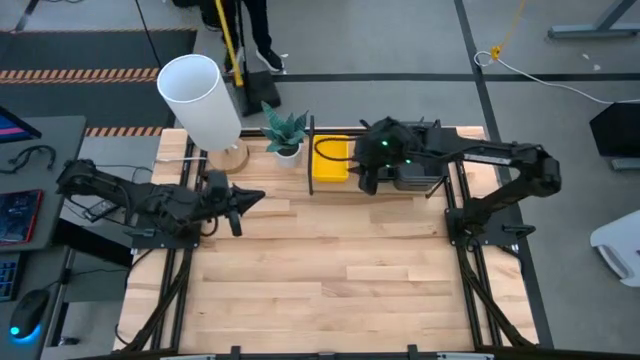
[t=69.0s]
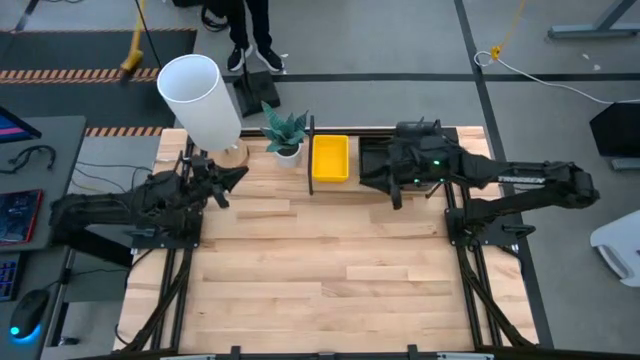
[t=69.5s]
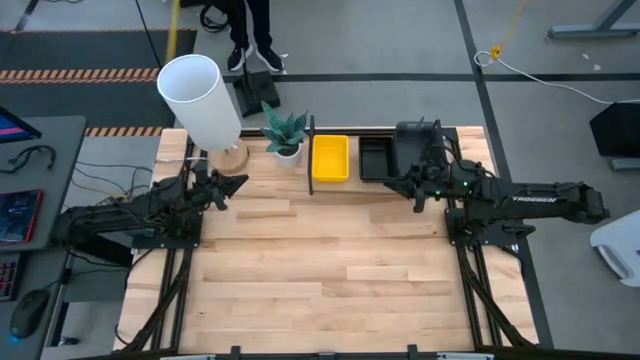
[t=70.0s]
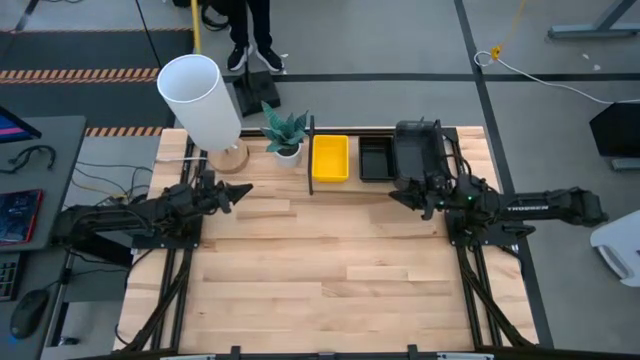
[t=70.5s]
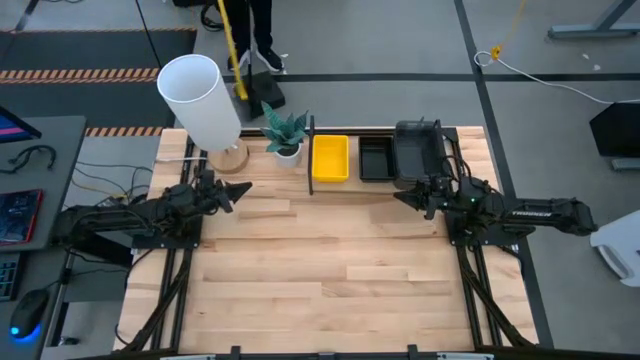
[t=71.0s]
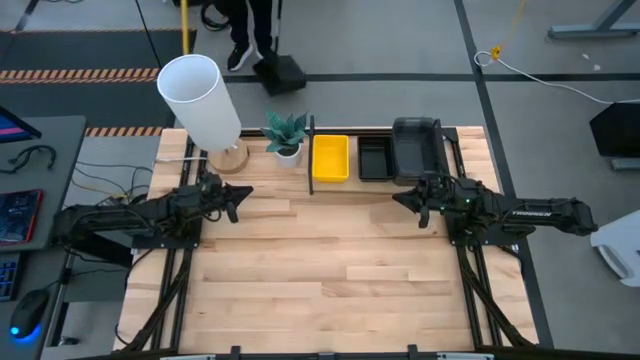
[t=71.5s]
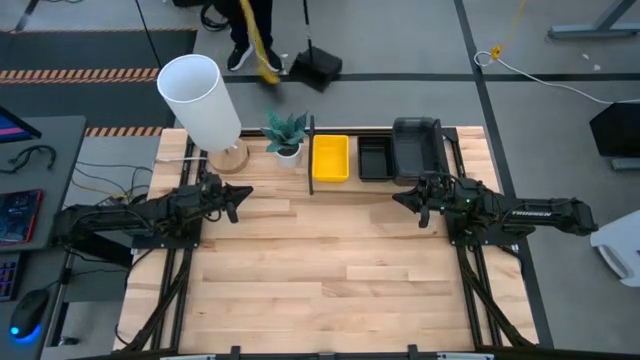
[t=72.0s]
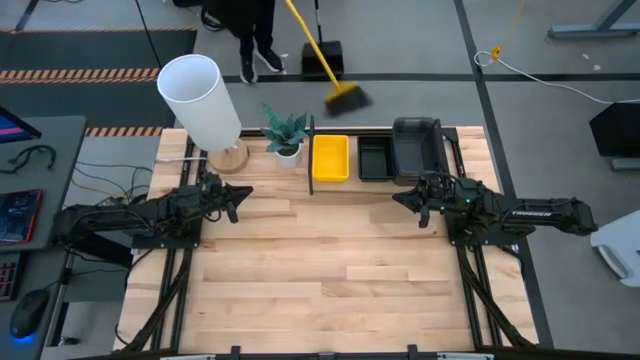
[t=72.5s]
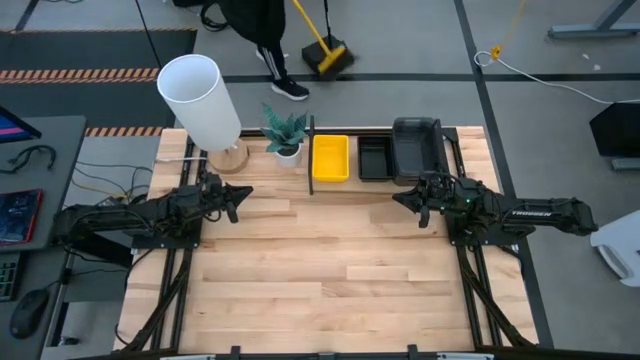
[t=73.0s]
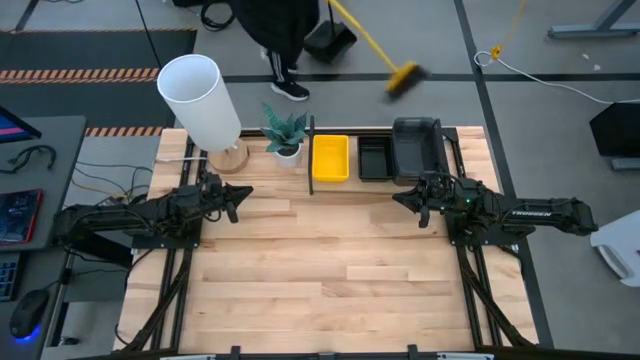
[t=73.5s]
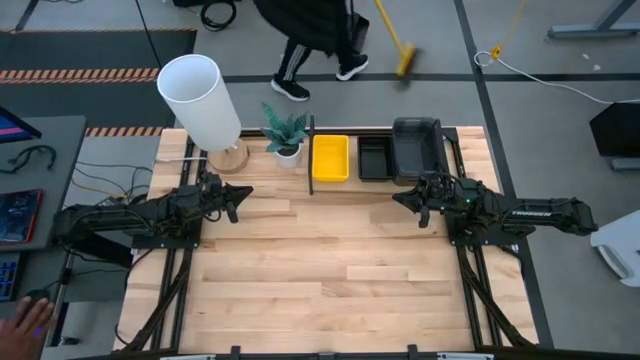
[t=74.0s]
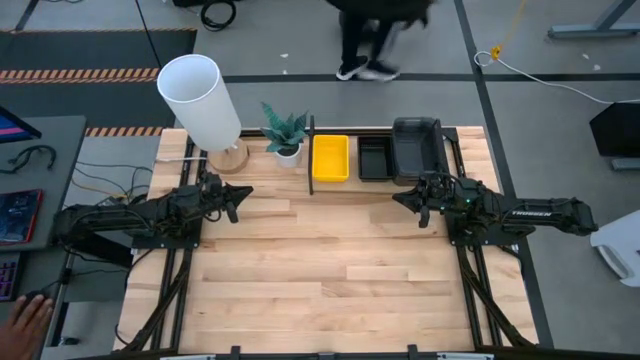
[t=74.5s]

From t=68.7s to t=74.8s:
Task: Stack baskets on shelf by color
Return to Home Position

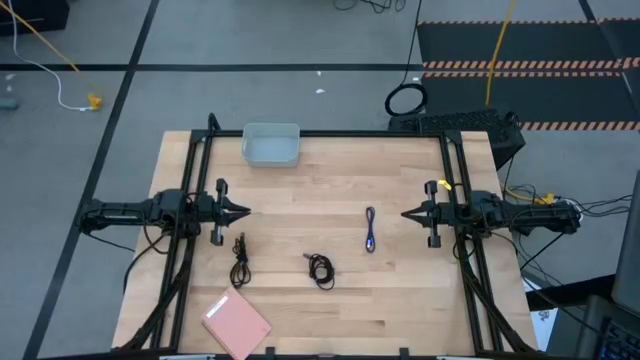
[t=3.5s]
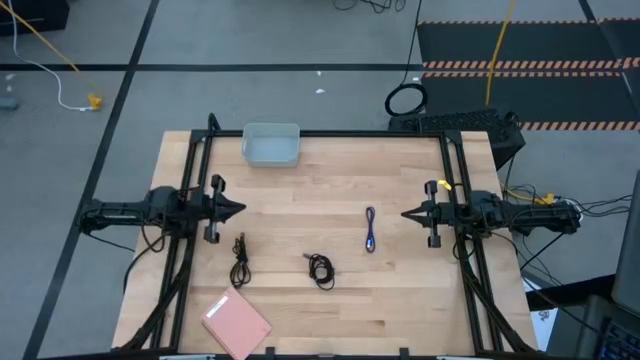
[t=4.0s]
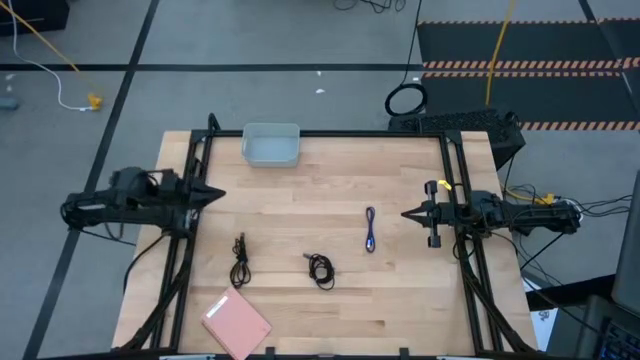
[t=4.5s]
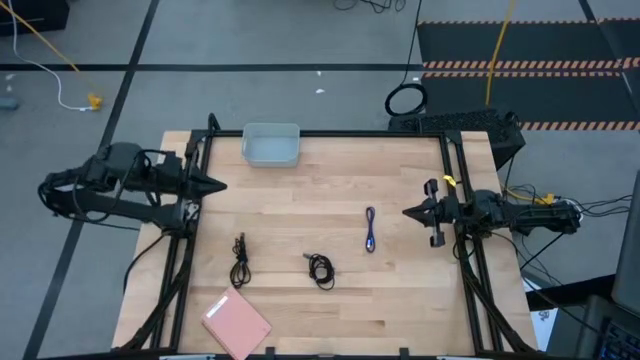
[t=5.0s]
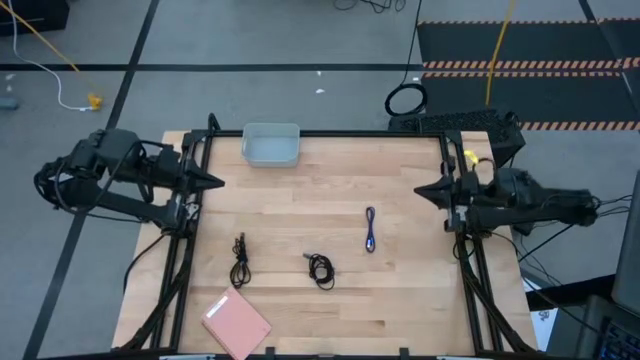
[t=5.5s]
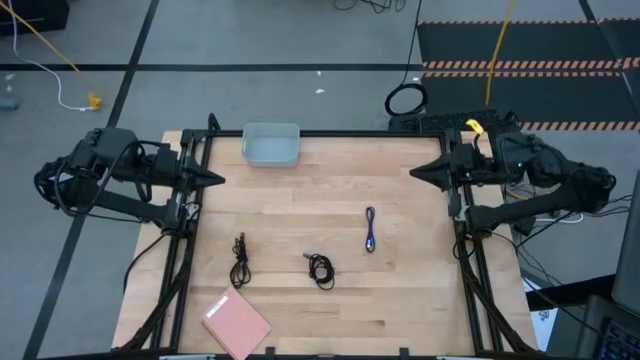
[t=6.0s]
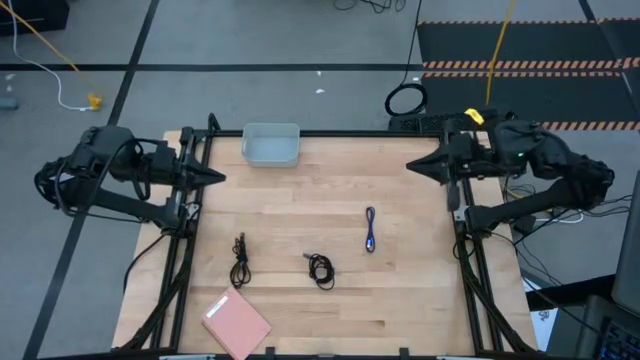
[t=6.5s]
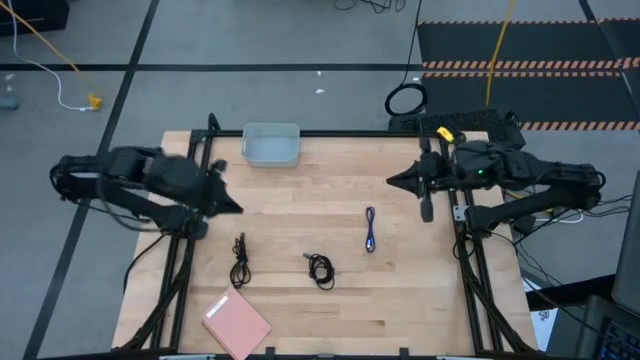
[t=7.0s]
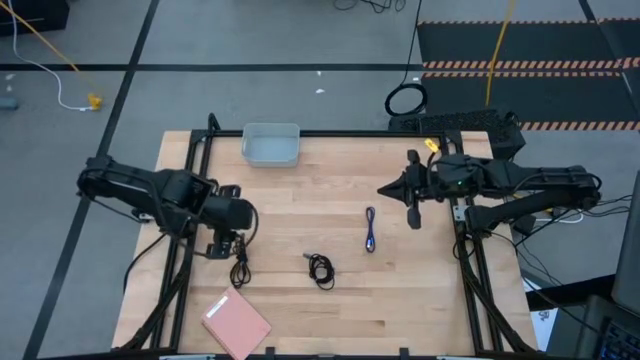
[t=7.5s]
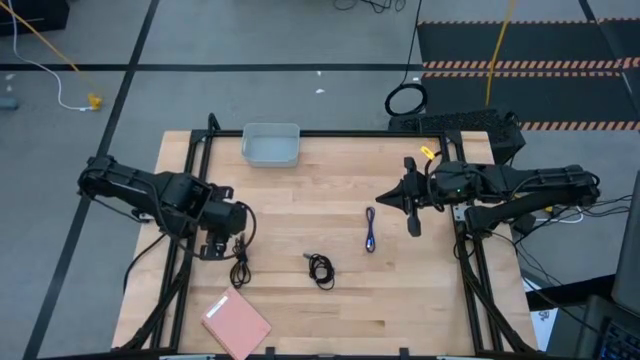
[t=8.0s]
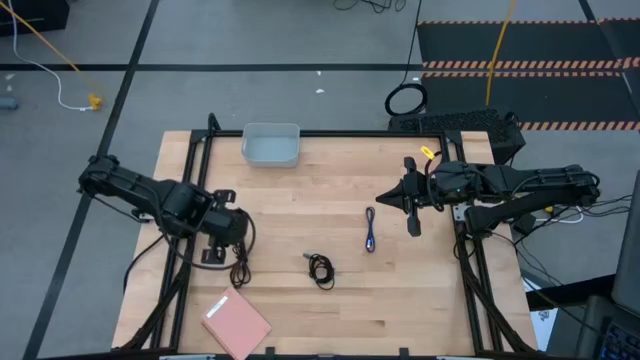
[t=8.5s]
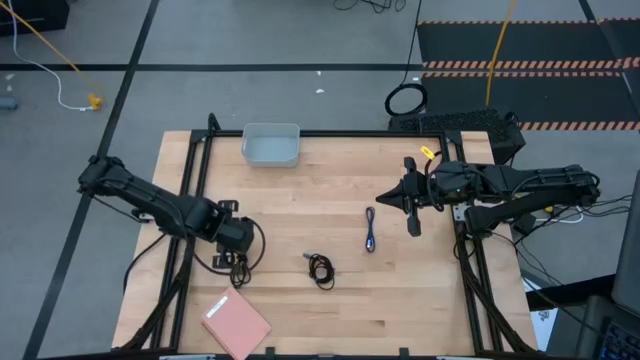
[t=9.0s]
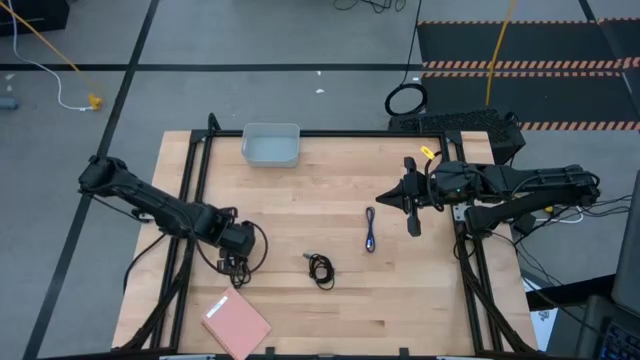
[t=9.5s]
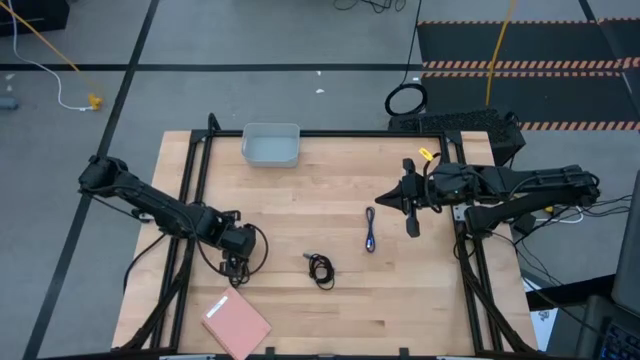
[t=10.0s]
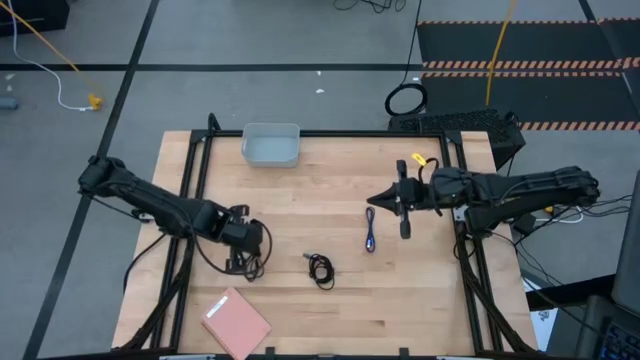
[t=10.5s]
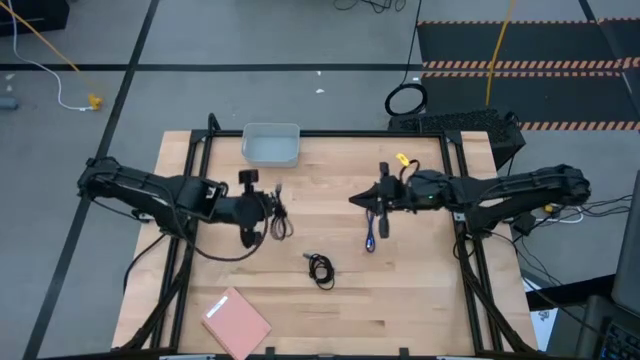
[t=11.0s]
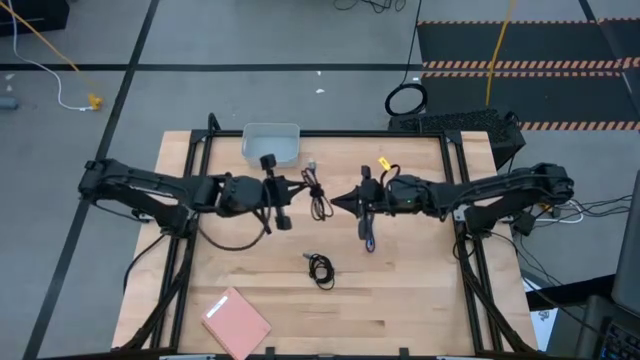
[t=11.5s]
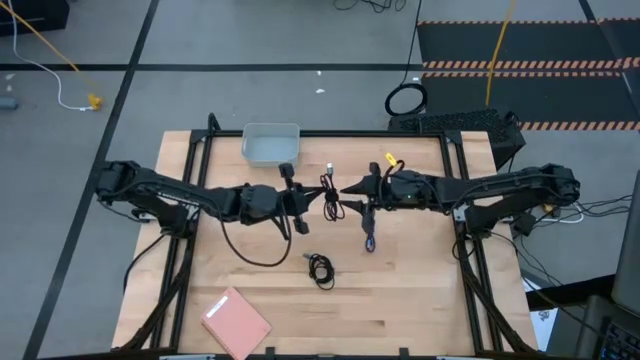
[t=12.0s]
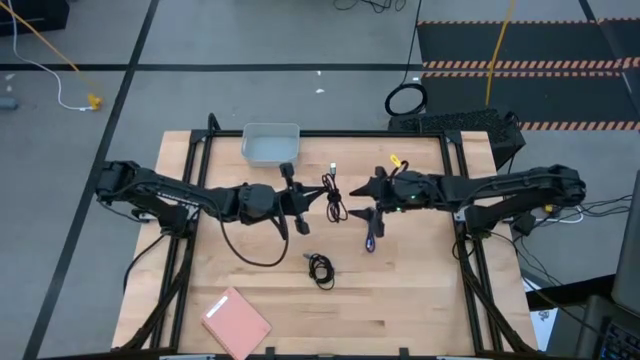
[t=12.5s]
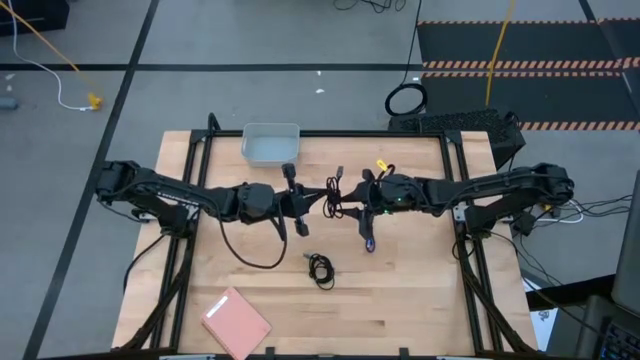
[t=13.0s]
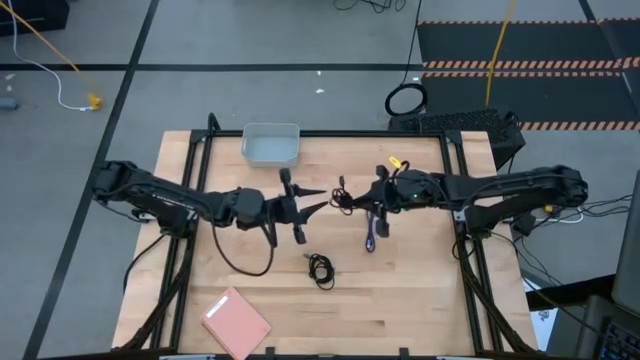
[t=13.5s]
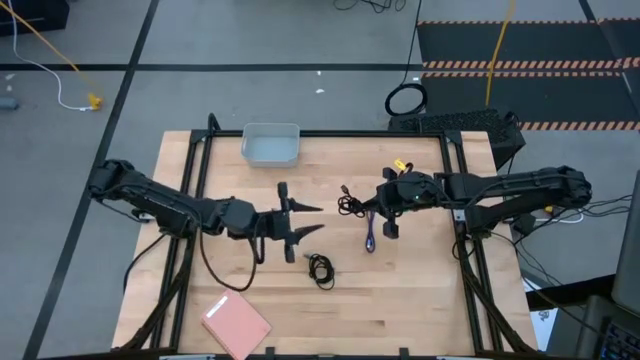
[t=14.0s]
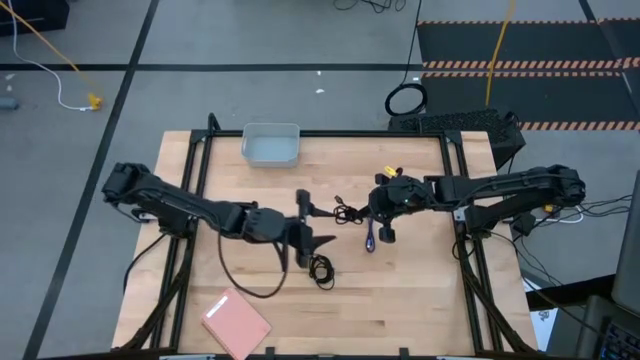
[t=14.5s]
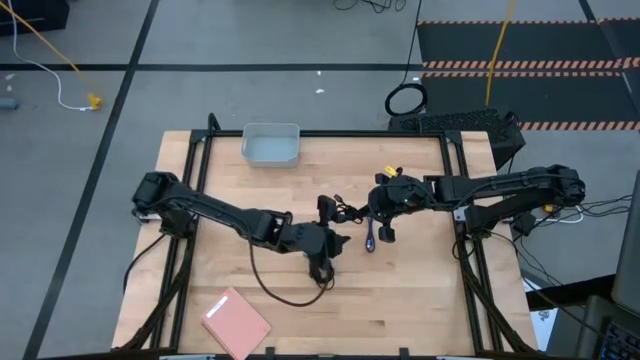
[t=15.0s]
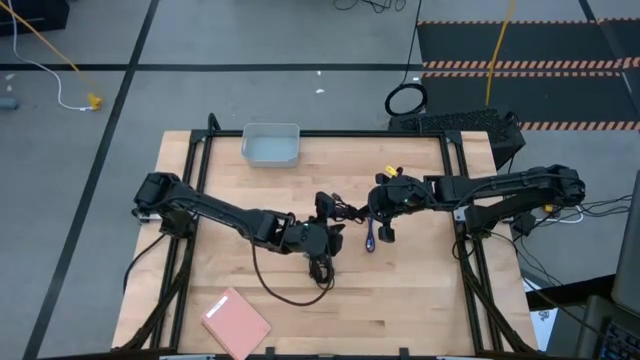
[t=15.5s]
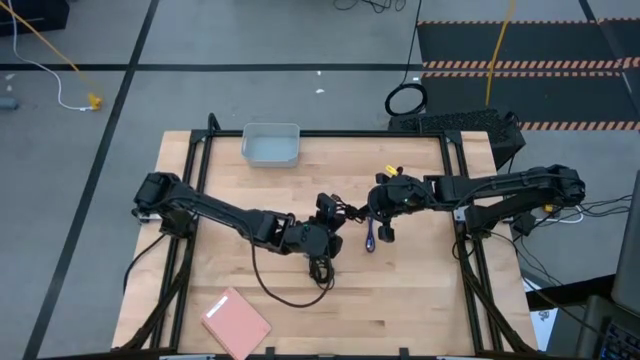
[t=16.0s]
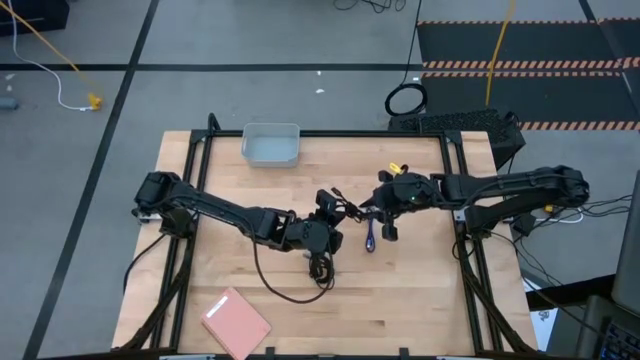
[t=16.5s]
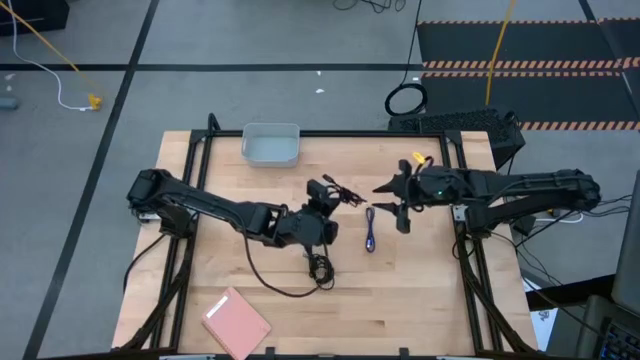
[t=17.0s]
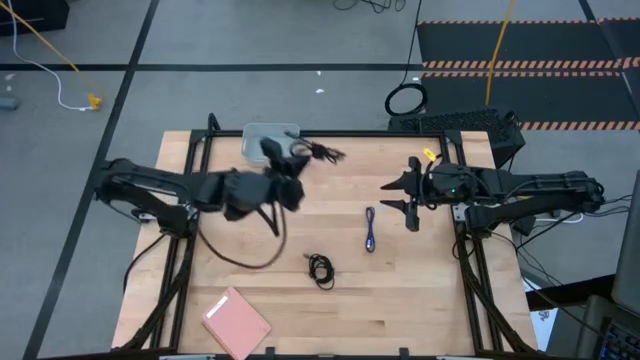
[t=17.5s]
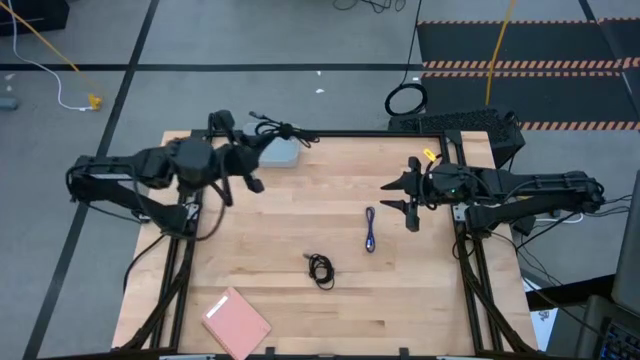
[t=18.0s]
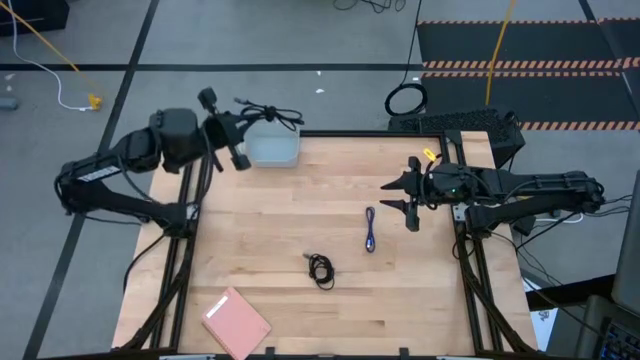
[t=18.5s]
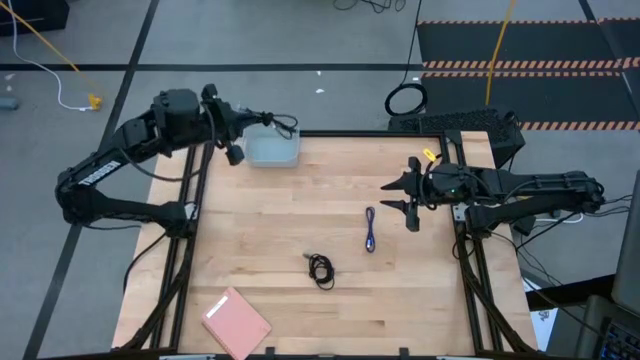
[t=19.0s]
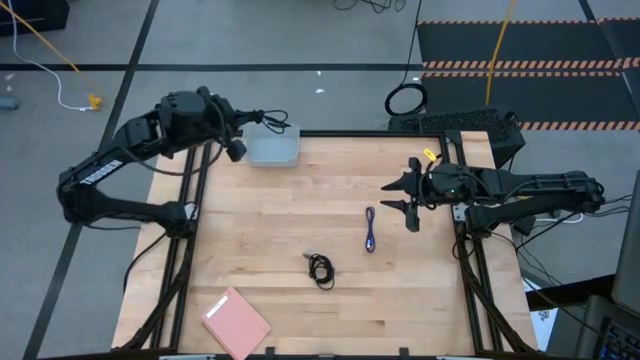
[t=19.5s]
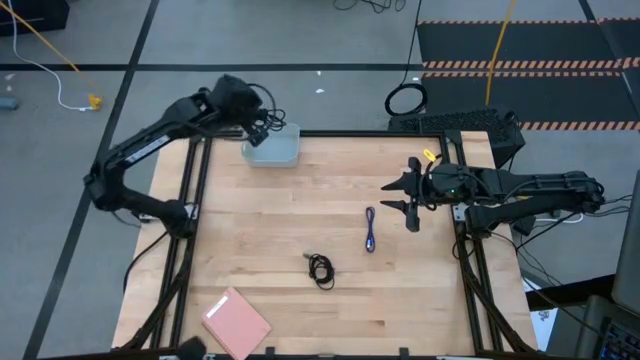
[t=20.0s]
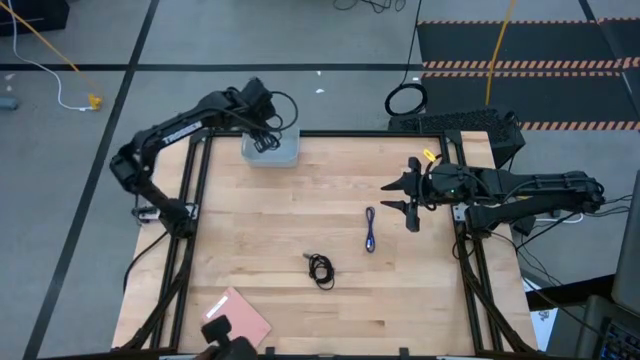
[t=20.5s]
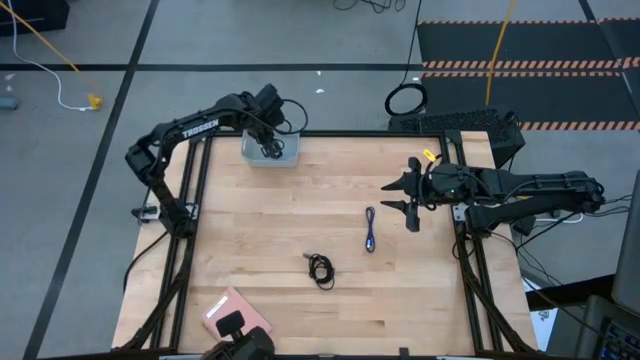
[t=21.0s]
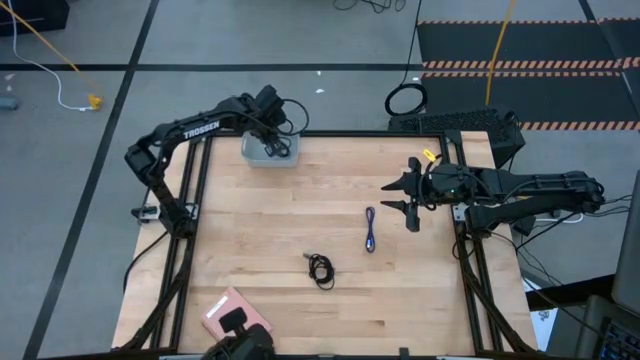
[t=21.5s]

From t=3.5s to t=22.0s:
Task: Pick and place USB-C Cables
Put the left black charger cable into the white bin
